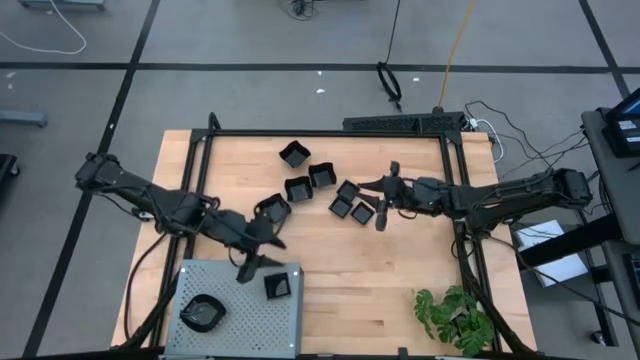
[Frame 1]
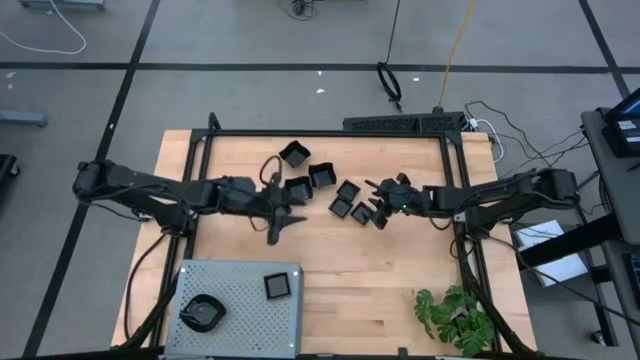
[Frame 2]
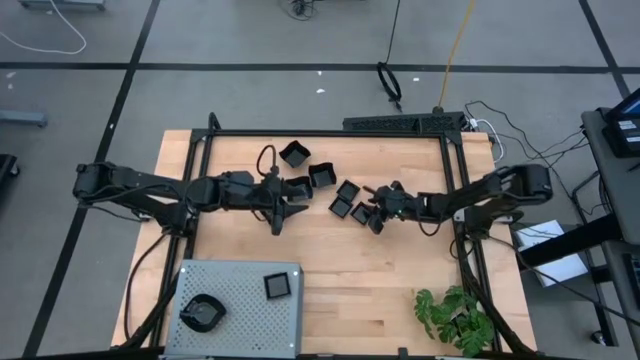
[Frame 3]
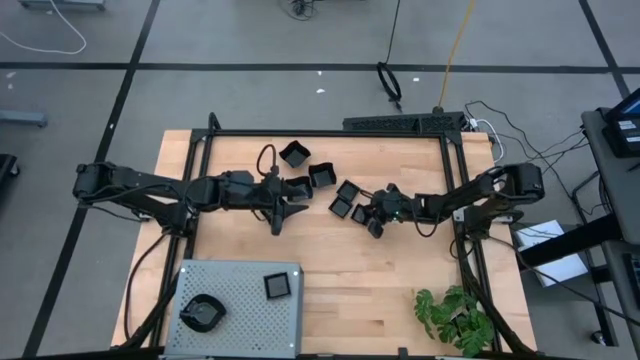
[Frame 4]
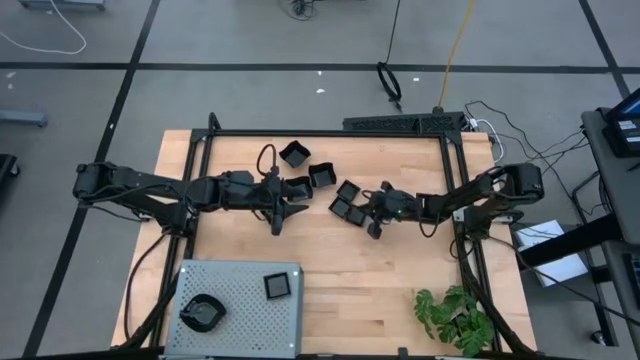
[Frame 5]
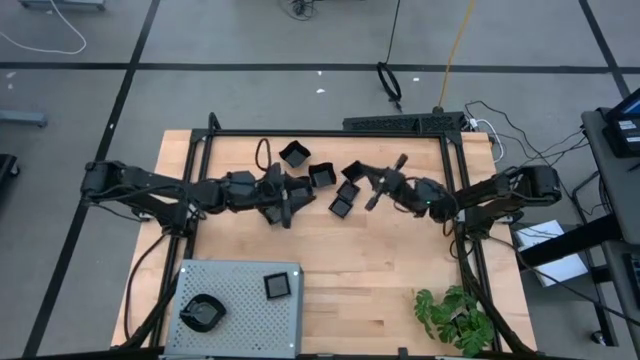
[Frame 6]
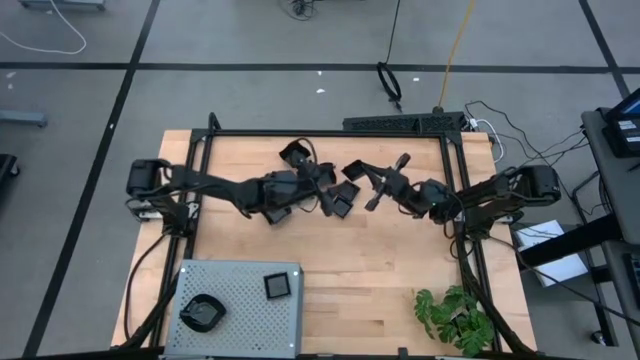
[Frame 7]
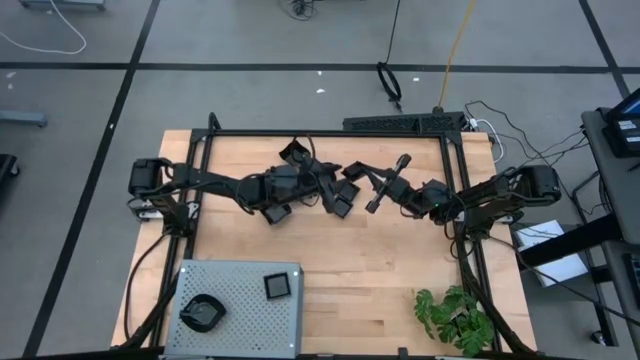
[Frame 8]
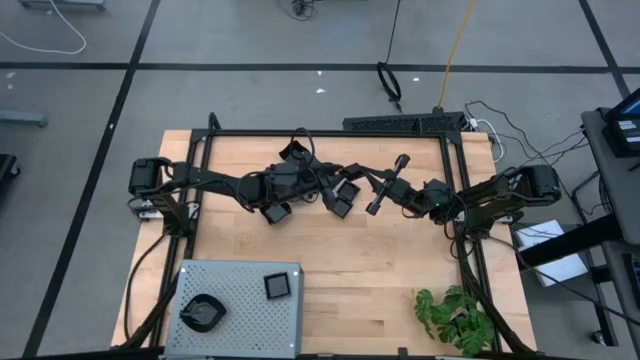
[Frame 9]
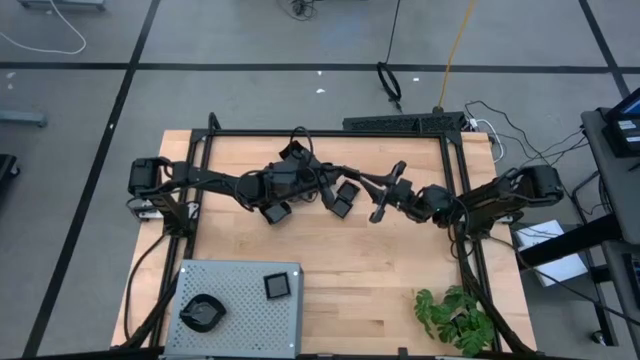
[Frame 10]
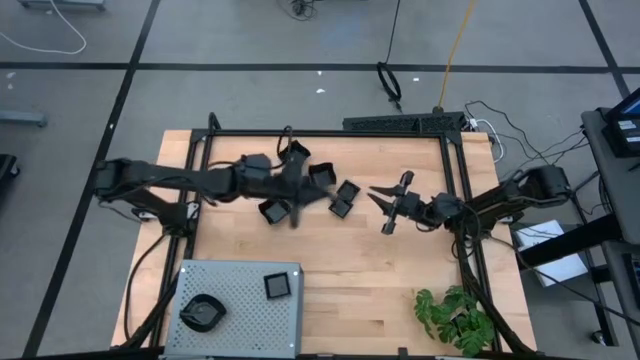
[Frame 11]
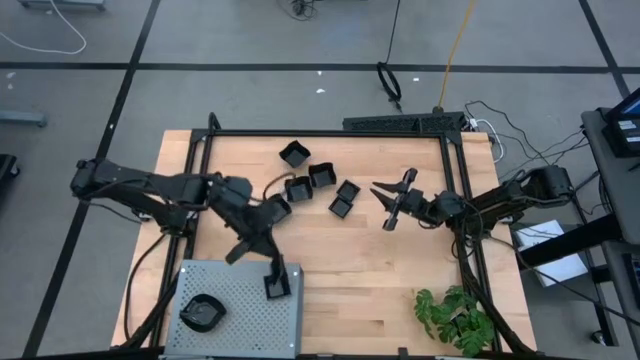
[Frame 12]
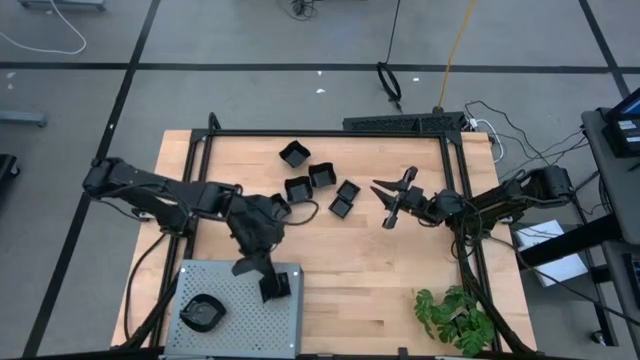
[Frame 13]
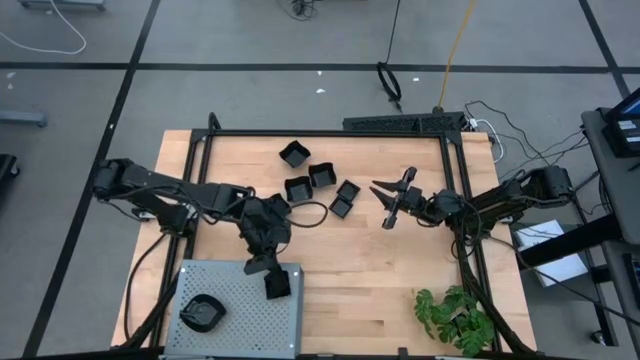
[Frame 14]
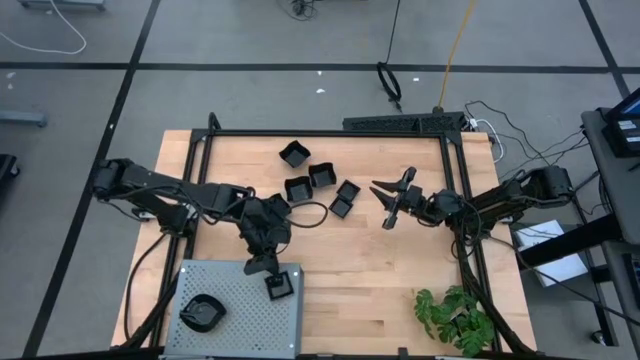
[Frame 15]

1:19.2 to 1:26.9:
Task: Pick & Place Mini shaped plates
Stack the square plate on top of the other square plate on the shelf

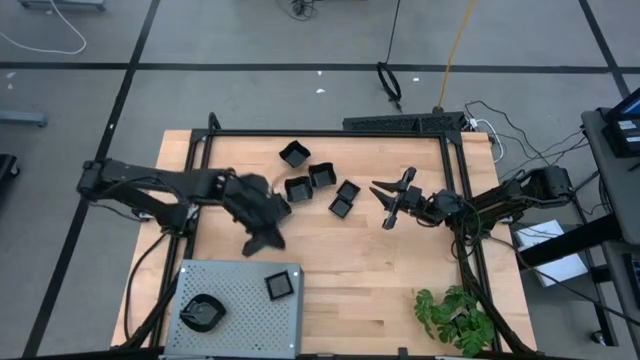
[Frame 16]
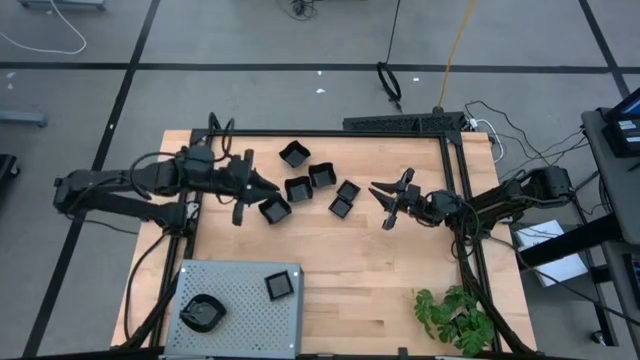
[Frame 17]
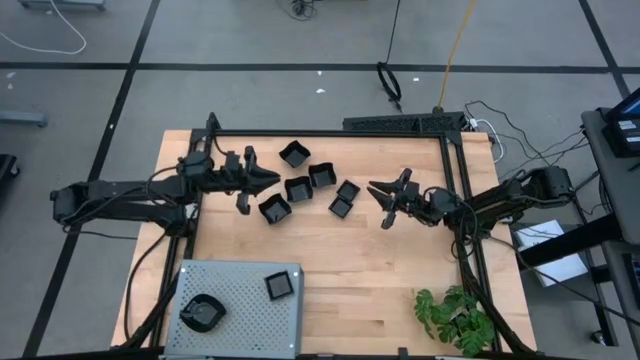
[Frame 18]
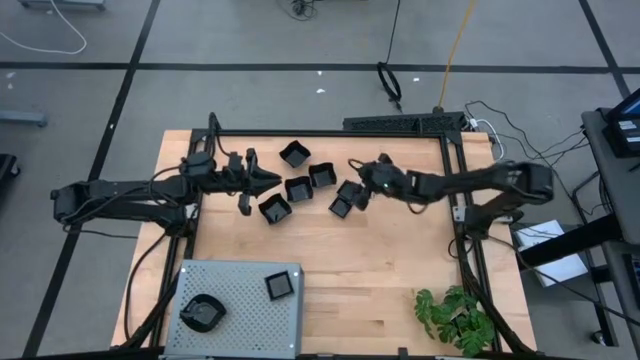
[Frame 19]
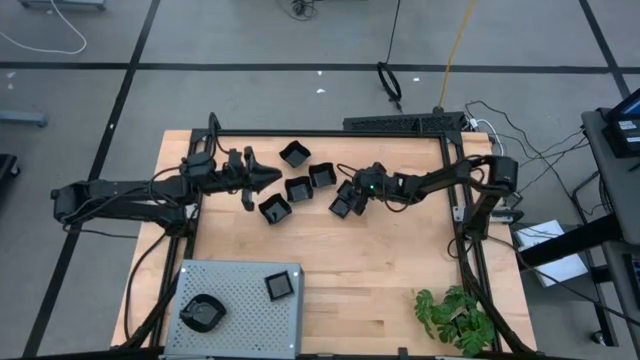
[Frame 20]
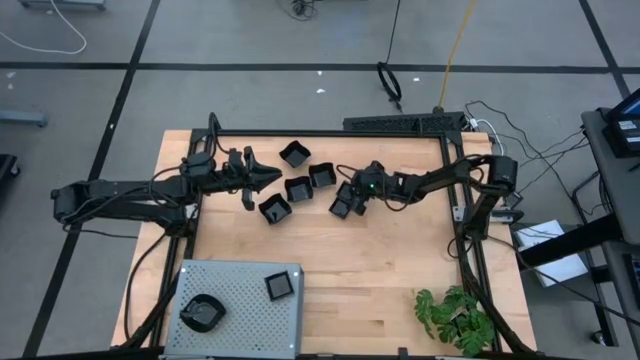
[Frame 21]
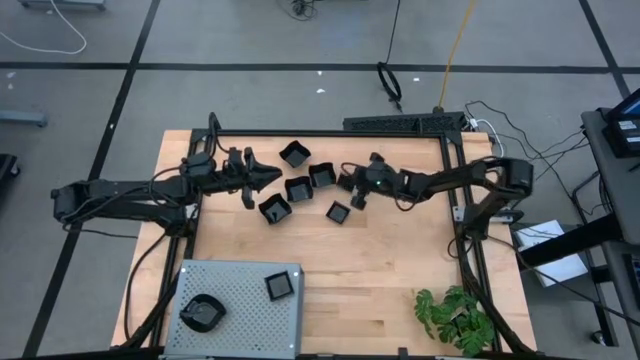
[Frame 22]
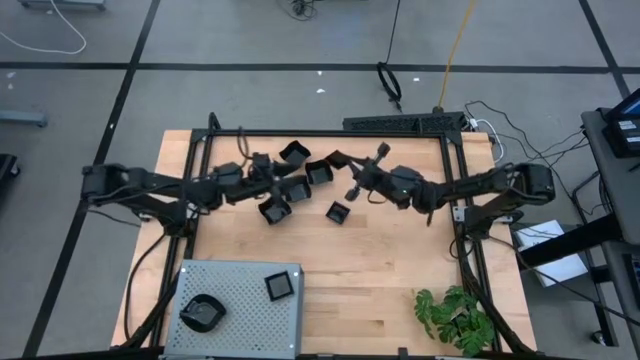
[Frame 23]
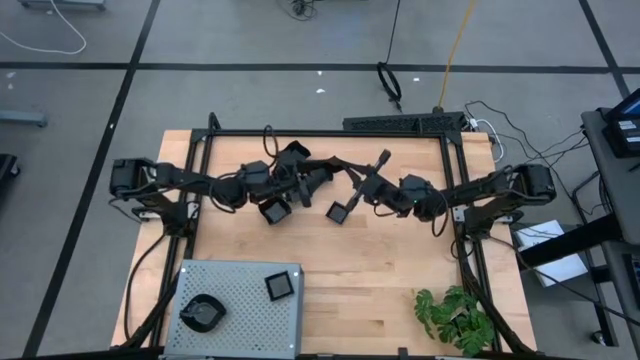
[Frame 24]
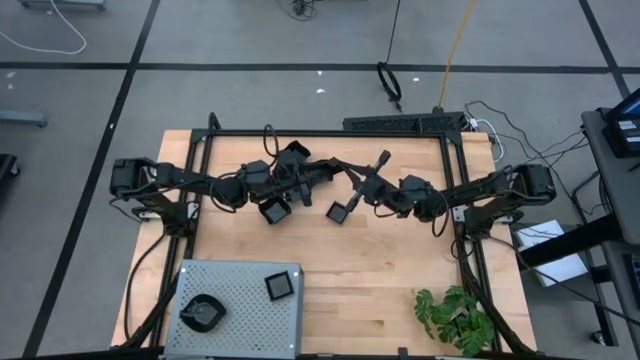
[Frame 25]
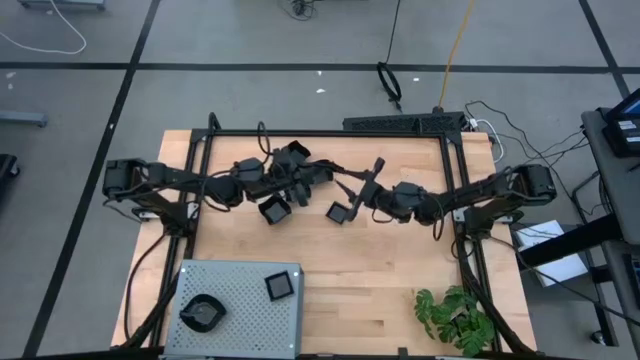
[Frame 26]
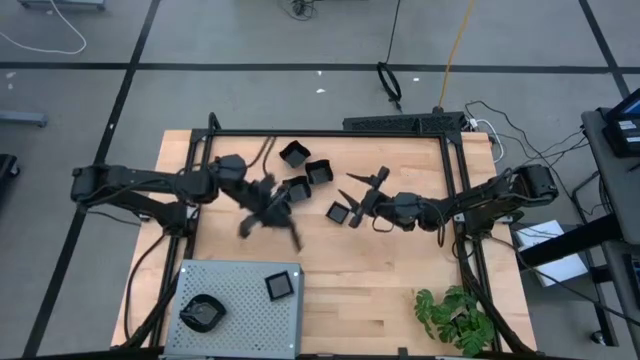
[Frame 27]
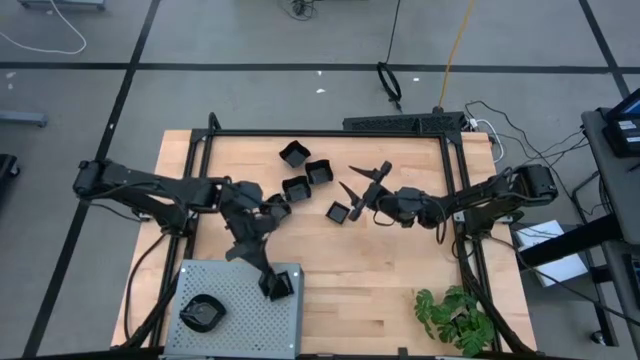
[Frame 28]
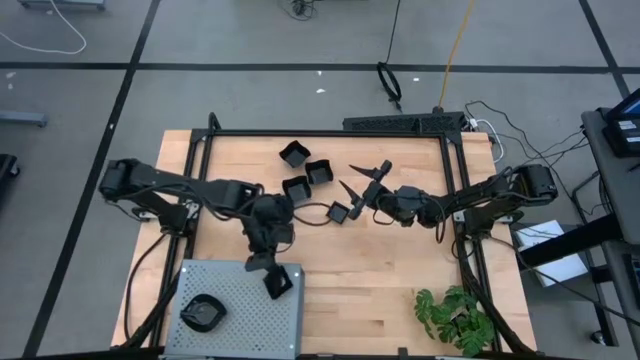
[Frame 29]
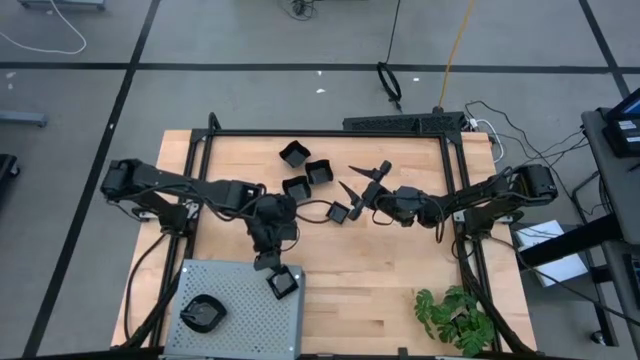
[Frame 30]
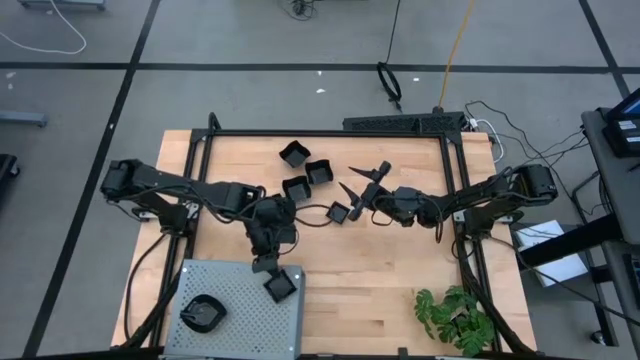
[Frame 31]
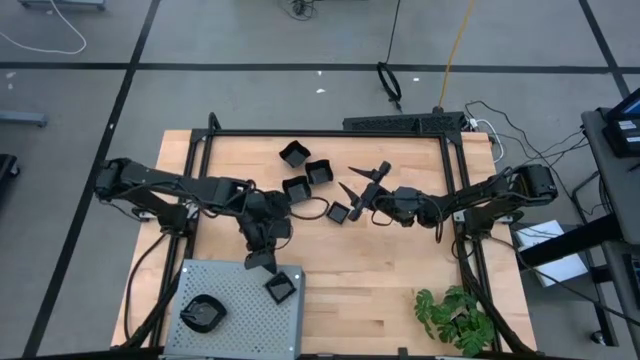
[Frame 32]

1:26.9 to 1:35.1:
Stack the square plate on top of the other square plate on the shelf

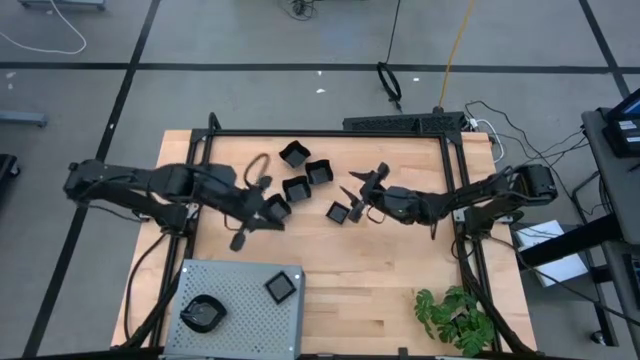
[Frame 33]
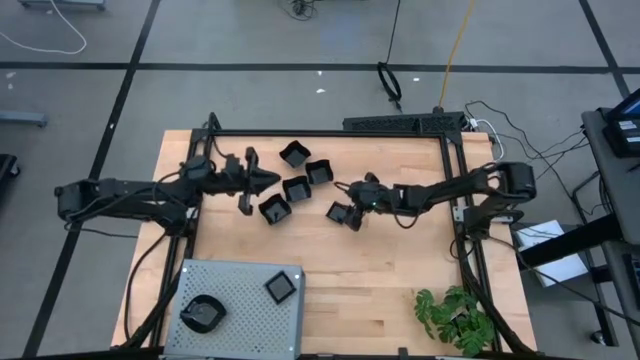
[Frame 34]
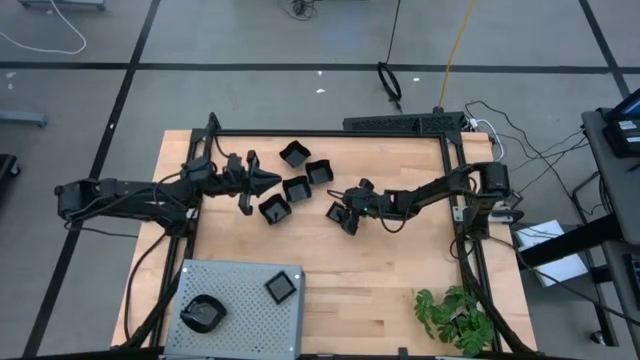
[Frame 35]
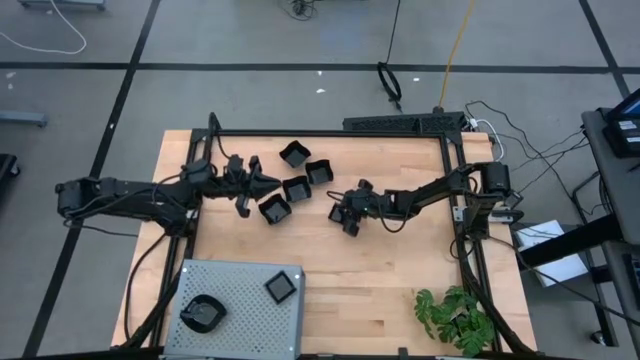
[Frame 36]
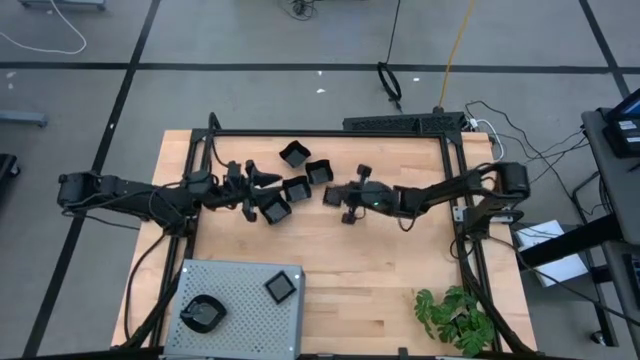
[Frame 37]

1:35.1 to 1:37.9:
Stack the square plate on top of the other square plate on the shelf

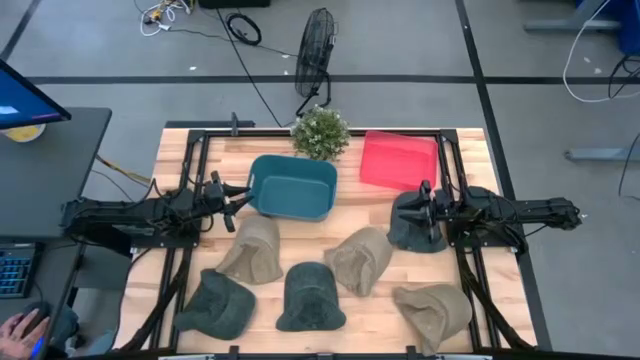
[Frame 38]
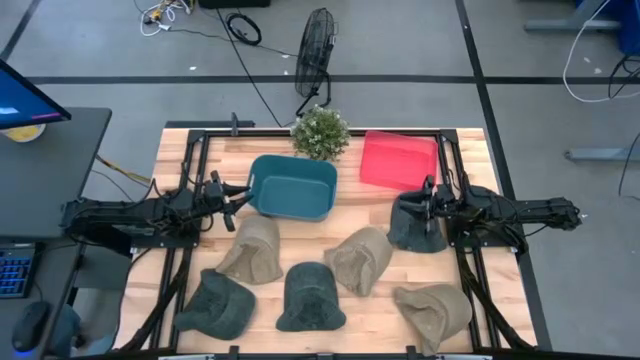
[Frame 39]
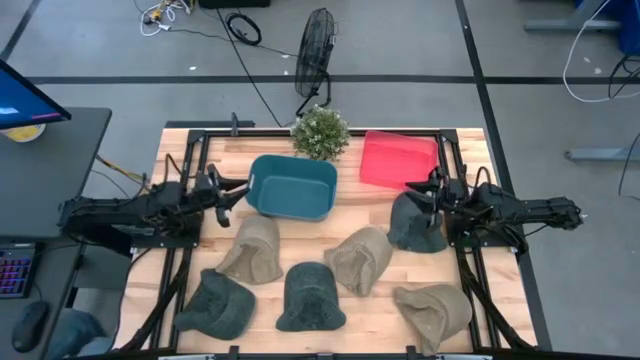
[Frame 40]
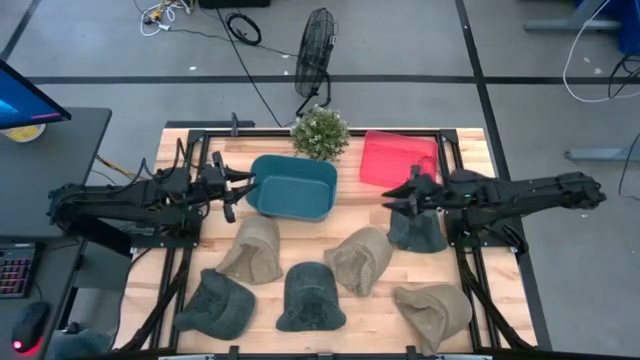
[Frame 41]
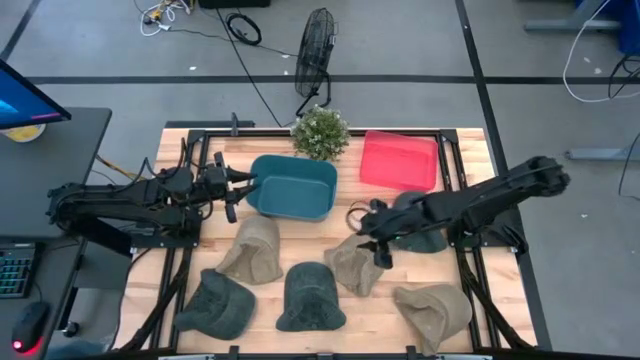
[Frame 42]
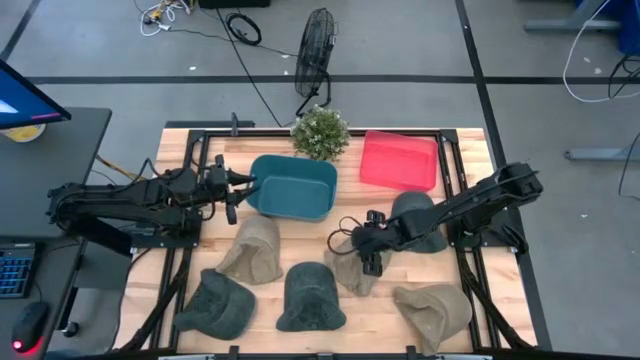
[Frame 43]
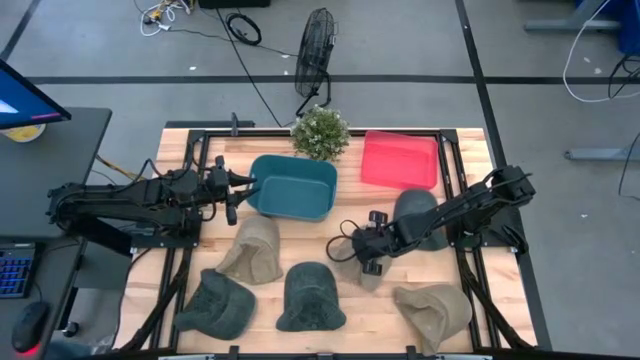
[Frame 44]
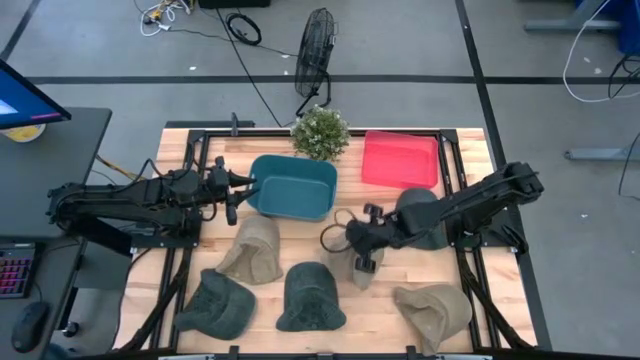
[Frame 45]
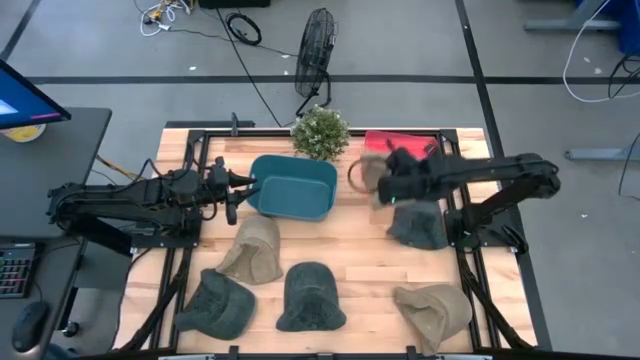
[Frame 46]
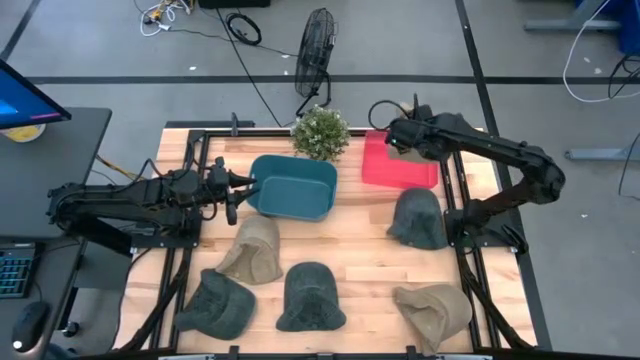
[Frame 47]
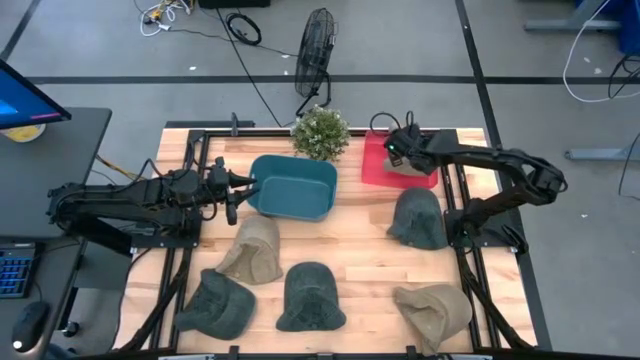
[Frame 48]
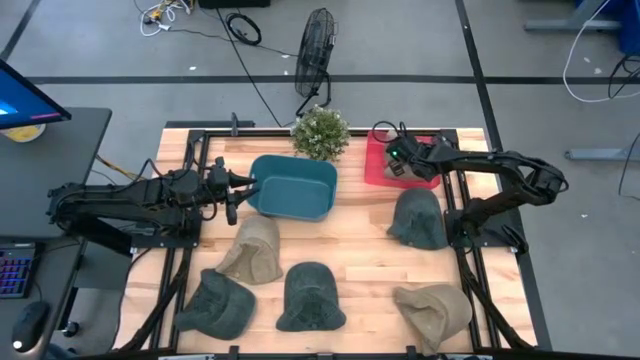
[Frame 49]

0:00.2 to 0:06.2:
Task: Pick & Place hat
Put the middle brown cap into the red bin
